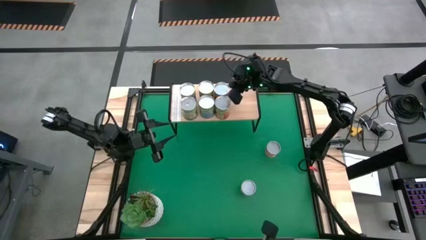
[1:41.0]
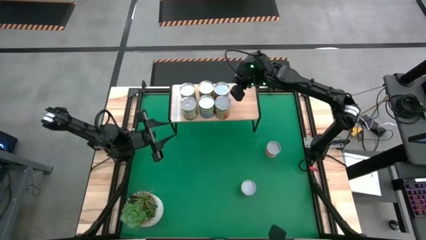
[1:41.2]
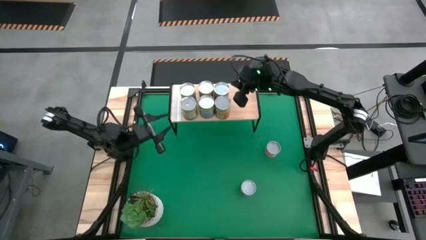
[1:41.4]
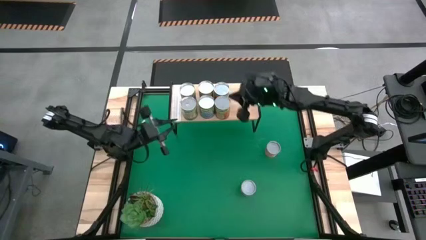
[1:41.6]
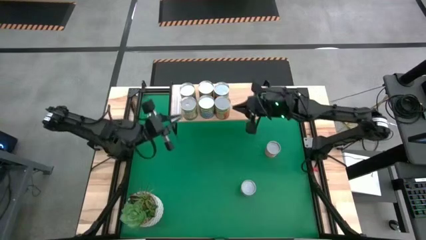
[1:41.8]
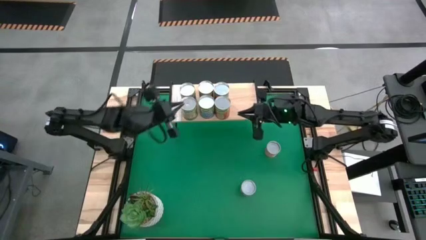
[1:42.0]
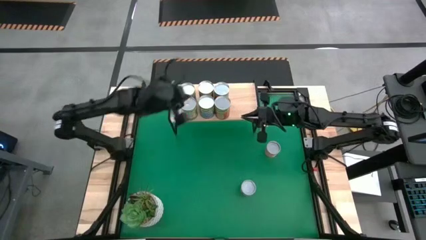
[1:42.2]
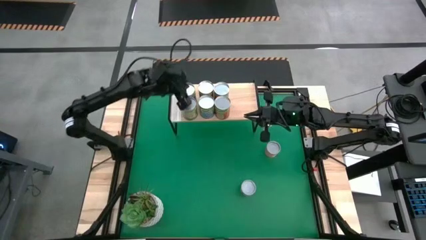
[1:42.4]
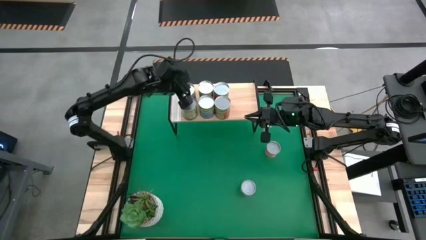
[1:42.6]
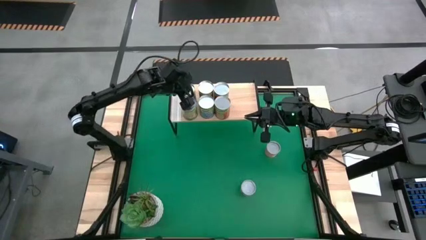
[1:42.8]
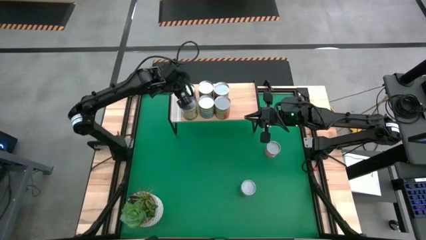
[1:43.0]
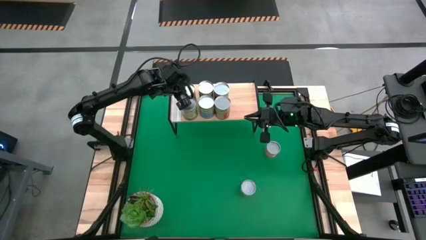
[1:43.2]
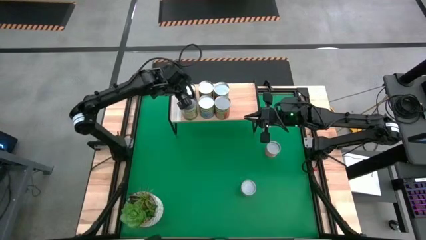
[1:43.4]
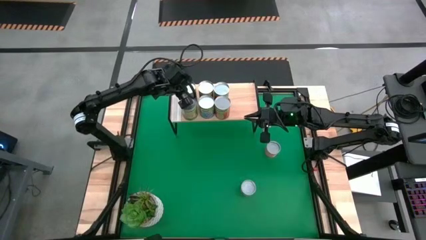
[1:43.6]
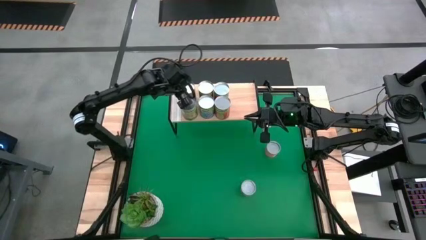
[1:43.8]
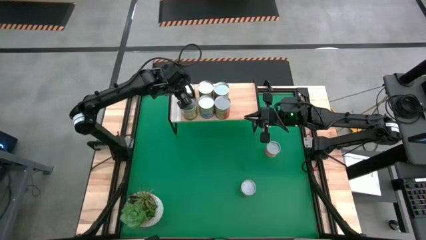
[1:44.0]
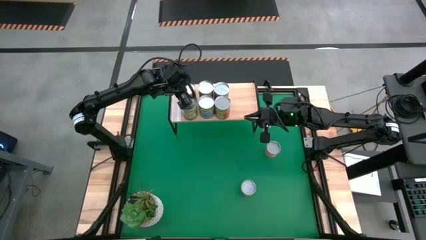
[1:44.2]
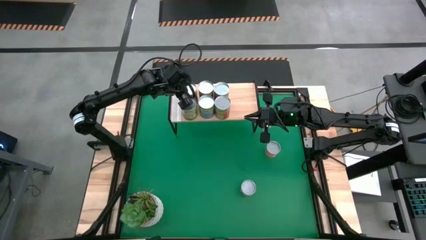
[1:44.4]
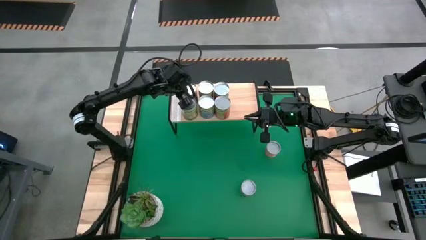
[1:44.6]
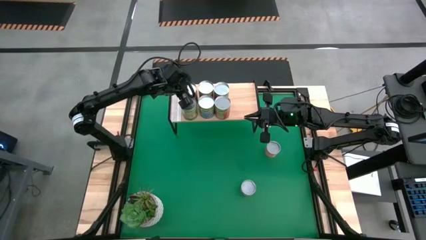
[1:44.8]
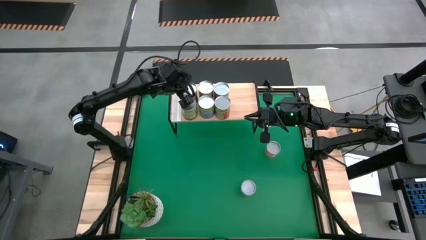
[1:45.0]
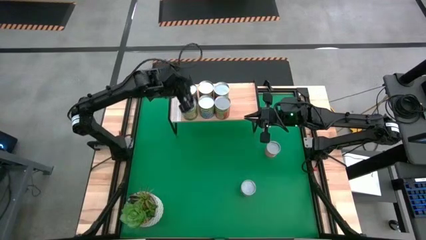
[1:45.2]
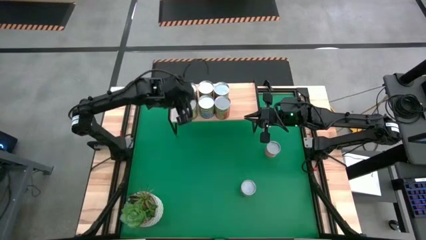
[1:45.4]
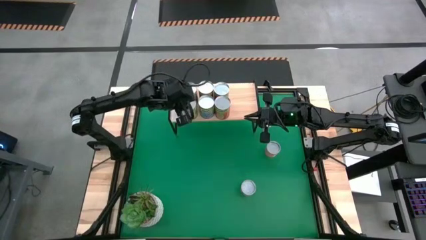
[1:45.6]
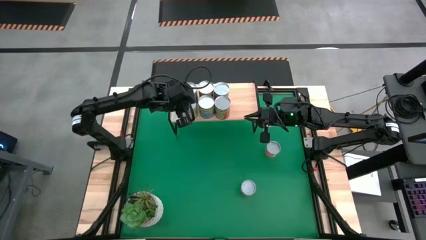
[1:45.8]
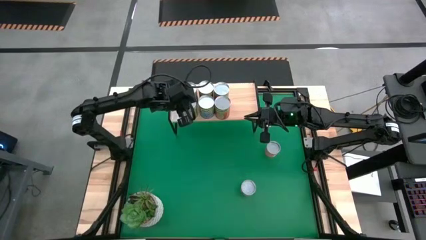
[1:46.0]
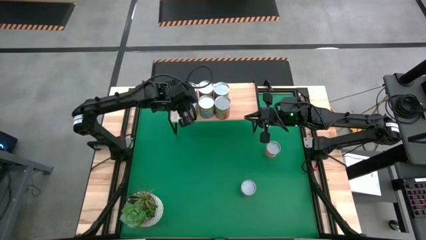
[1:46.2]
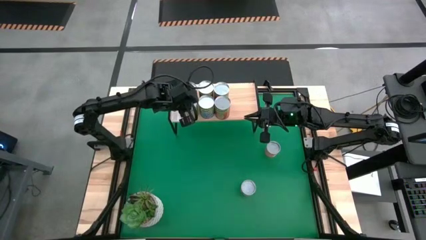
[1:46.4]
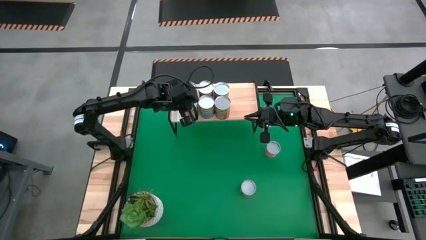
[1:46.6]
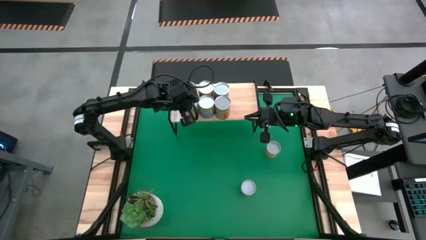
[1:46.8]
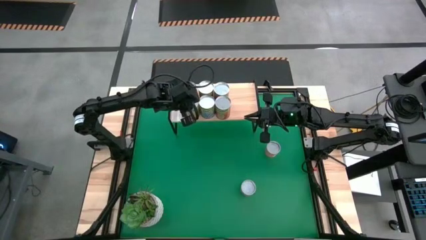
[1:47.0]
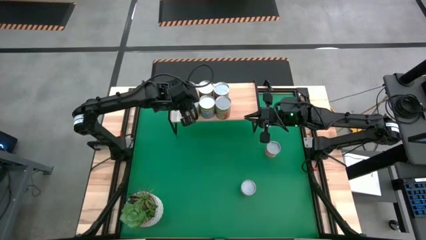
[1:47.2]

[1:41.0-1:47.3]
Task: Pick and place cans onto a shelf
Adjust the canned goods on the shelf

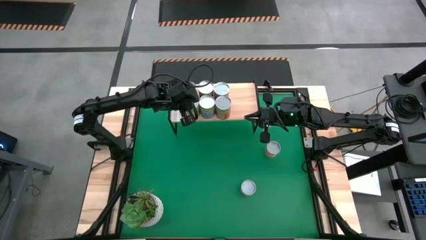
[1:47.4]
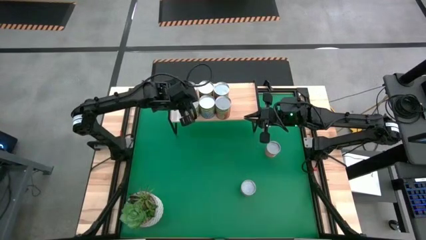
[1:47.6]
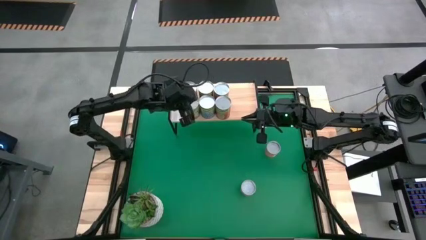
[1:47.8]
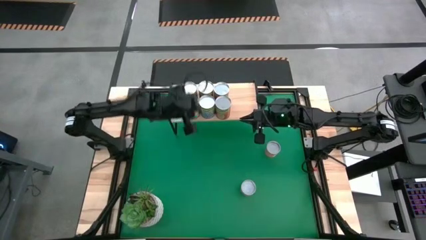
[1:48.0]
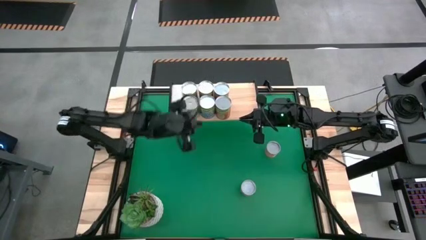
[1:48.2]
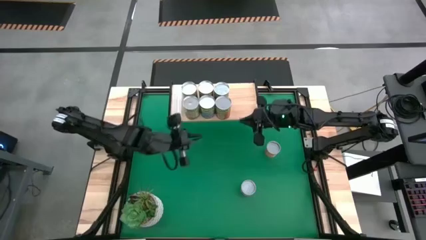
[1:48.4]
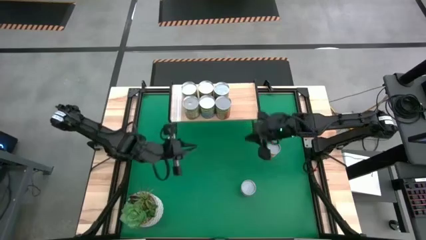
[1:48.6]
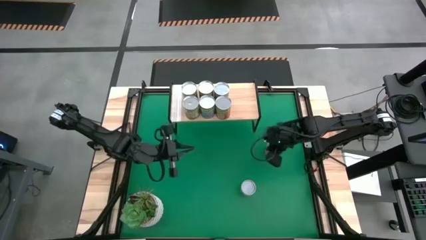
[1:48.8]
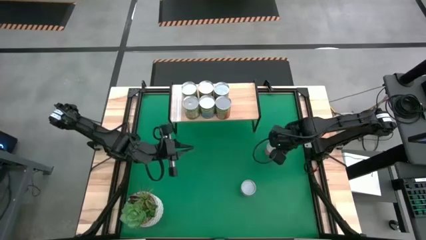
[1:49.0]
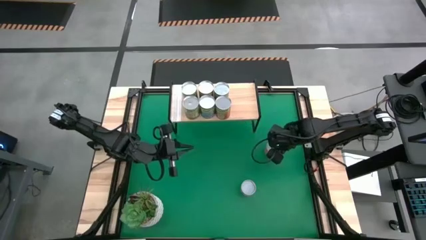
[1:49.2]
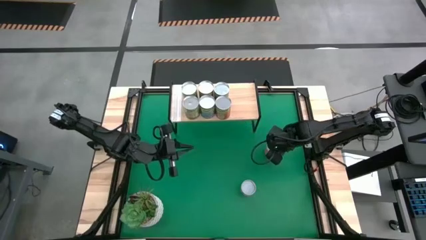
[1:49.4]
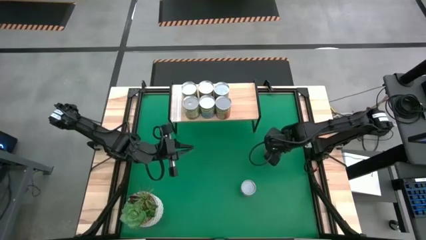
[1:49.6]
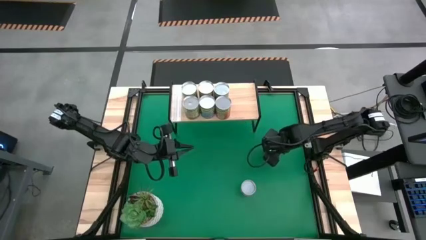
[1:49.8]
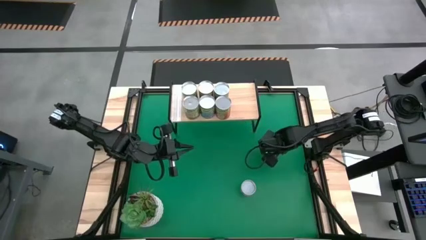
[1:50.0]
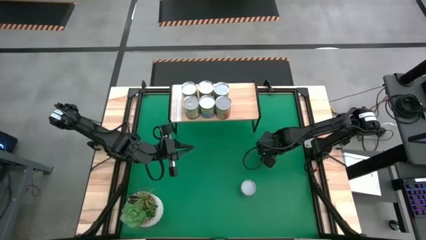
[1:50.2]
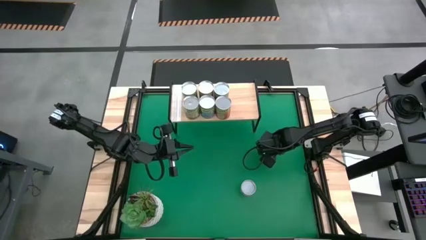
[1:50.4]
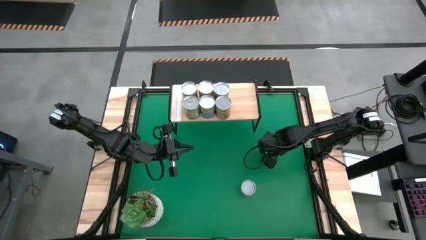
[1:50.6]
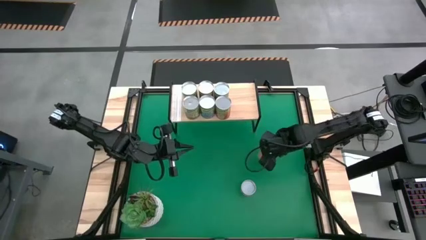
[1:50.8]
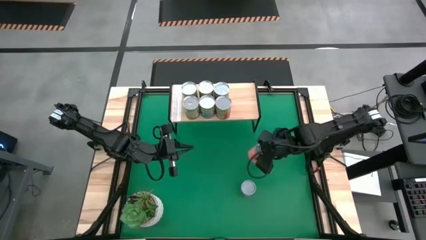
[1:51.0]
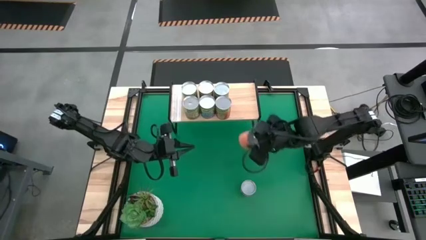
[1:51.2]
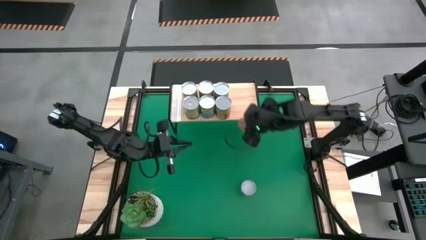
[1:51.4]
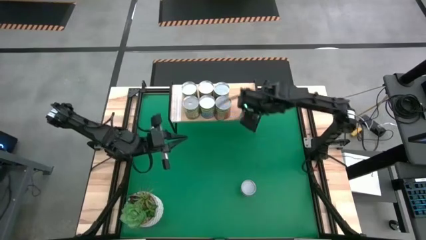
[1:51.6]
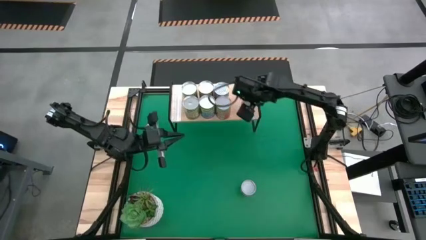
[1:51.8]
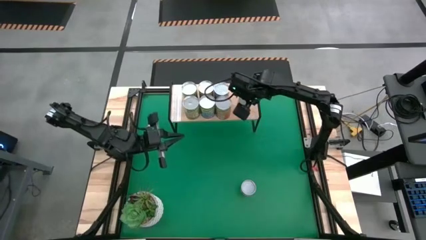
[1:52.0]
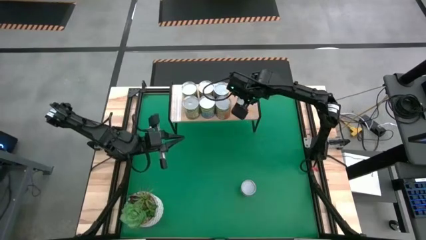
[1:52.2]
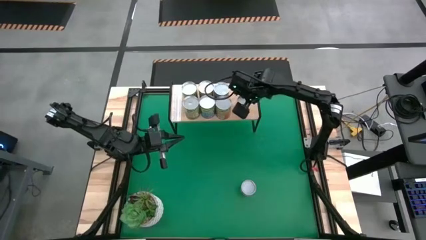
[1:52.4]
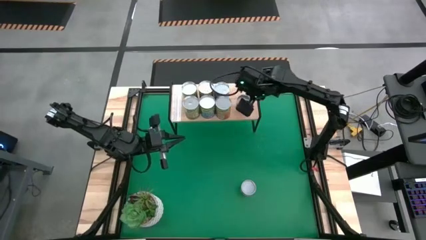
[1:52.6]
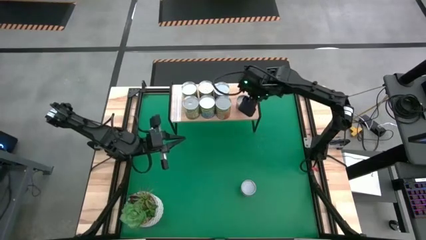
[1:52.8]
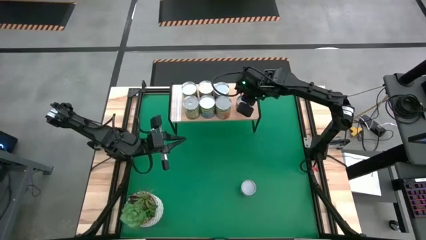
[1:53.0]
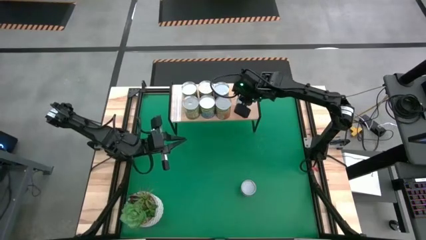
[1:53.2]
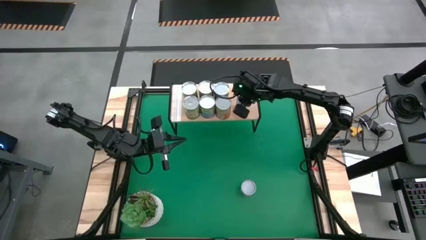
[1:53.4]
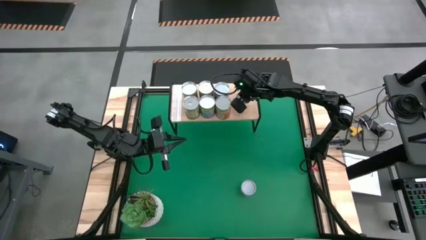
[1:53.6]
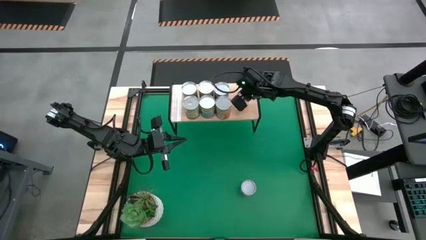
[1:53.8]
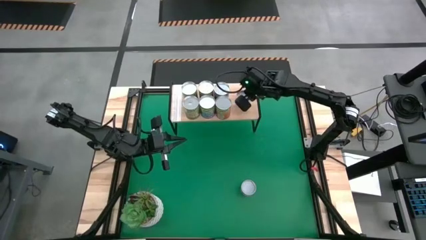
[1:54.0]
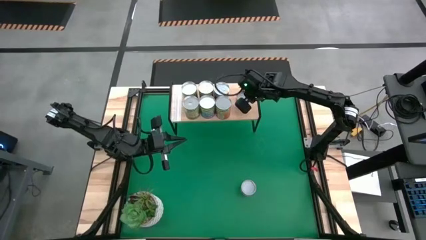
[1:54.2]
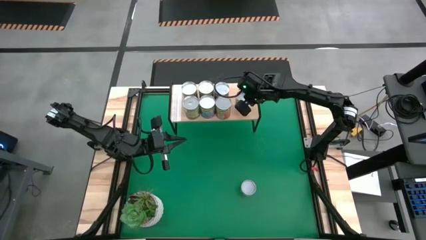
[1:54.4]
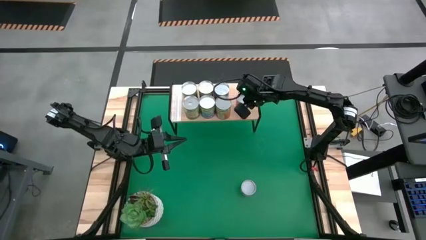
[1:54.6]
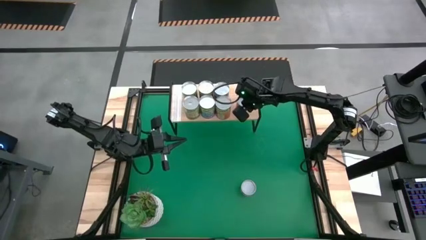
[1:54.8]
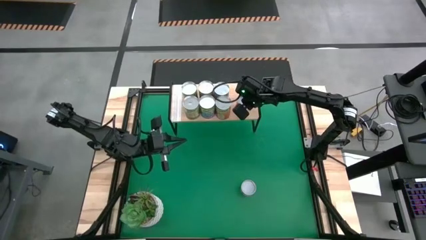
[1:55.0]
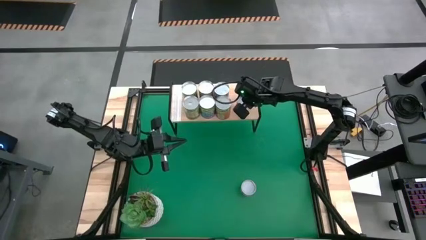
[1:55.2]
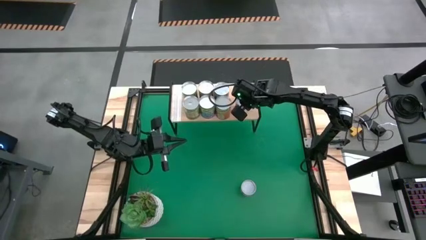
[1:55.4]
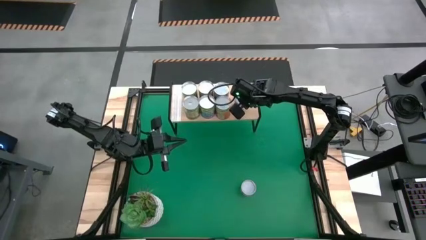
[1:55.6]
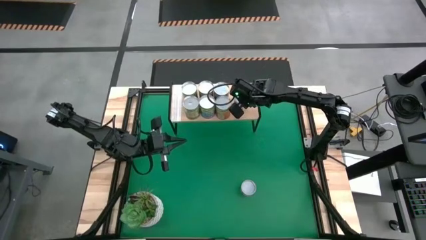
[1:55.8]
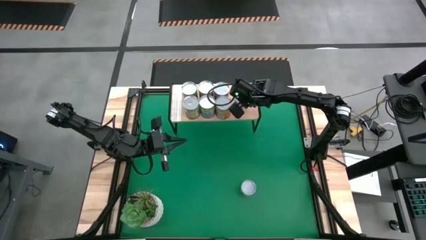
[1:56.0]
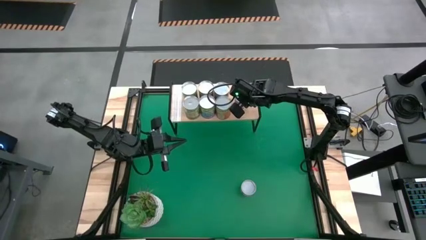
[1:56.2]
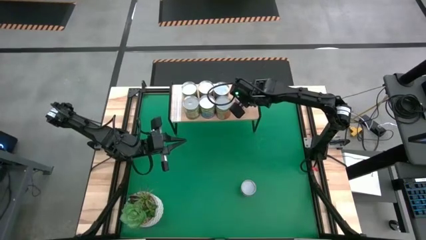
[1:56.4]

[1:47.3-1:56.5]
Put the canned sauce on the shelf
